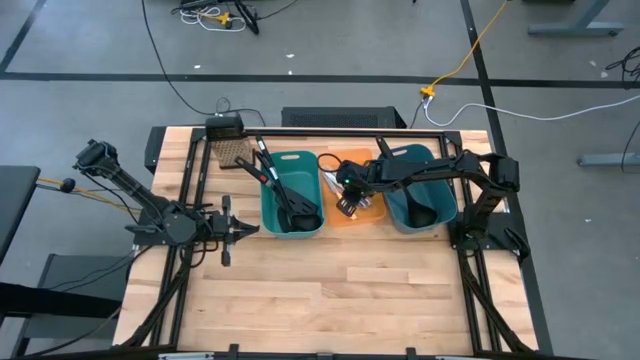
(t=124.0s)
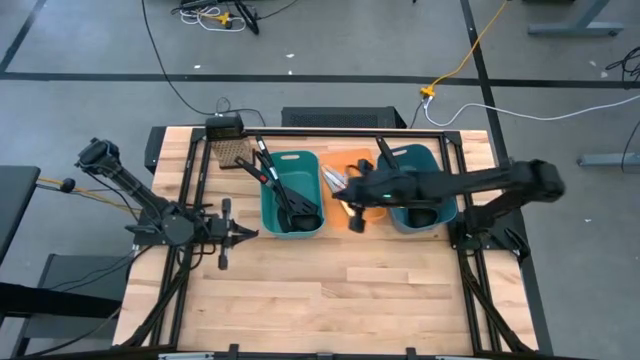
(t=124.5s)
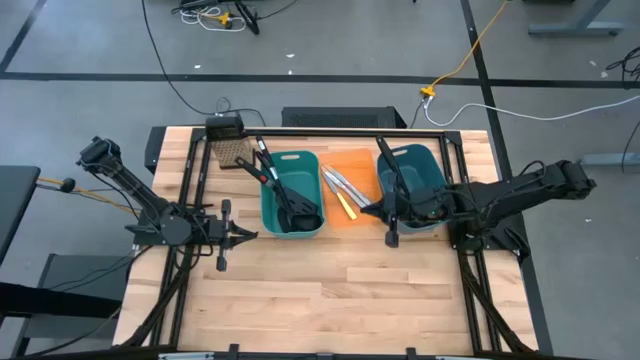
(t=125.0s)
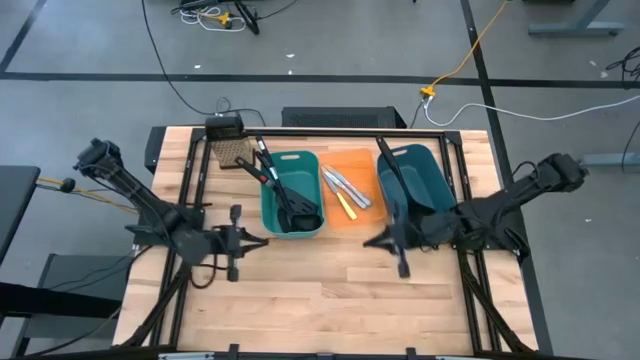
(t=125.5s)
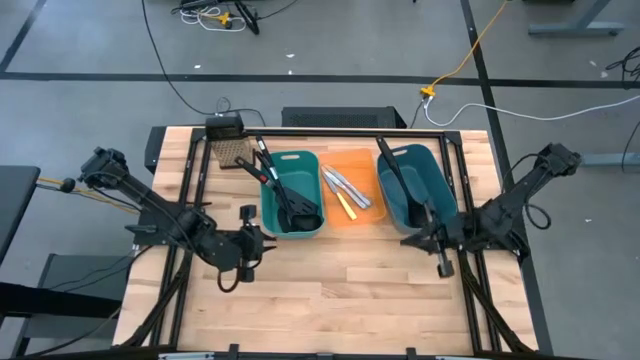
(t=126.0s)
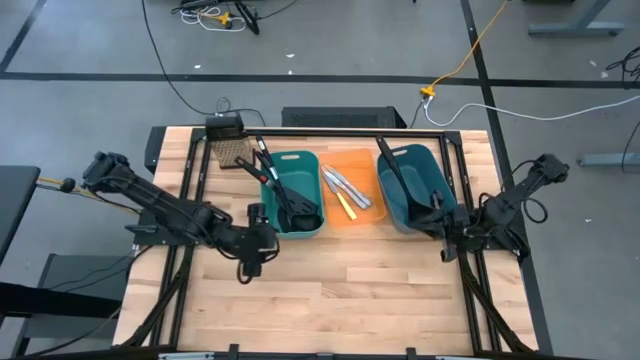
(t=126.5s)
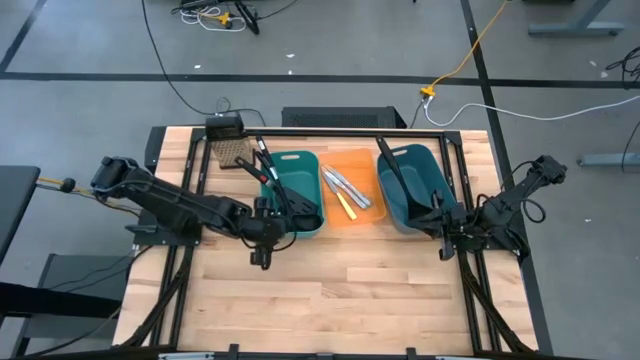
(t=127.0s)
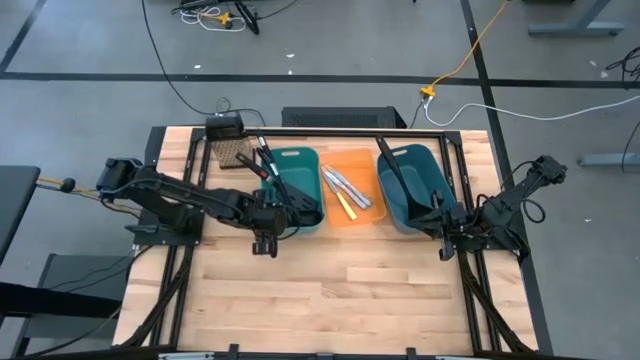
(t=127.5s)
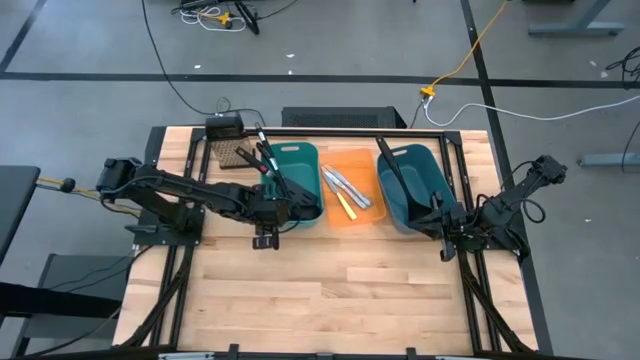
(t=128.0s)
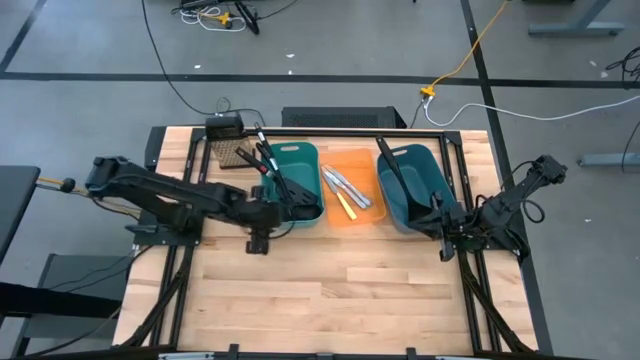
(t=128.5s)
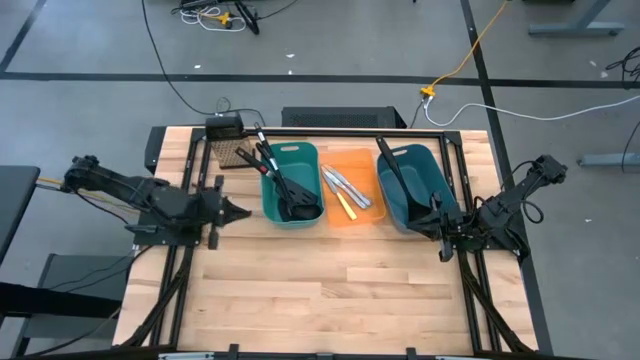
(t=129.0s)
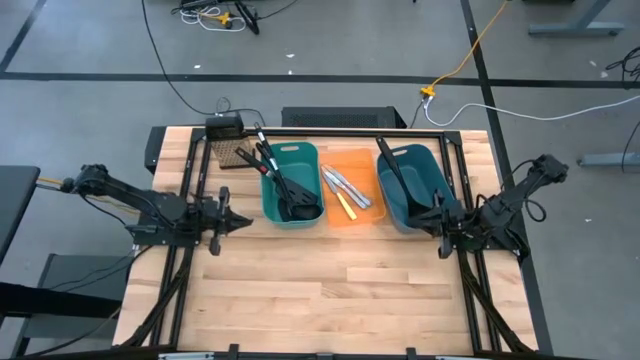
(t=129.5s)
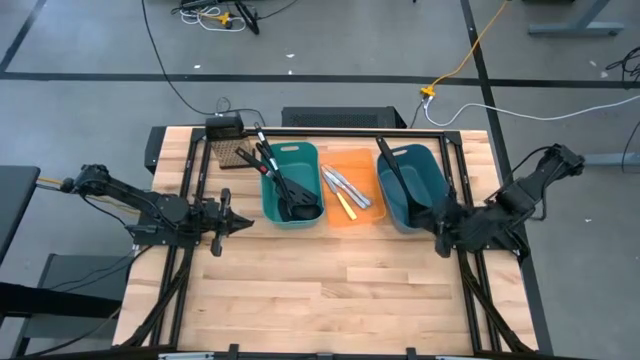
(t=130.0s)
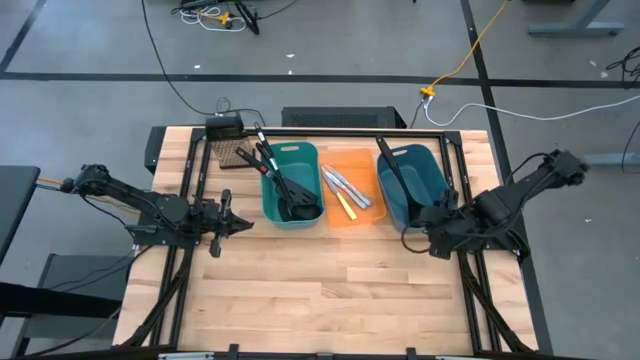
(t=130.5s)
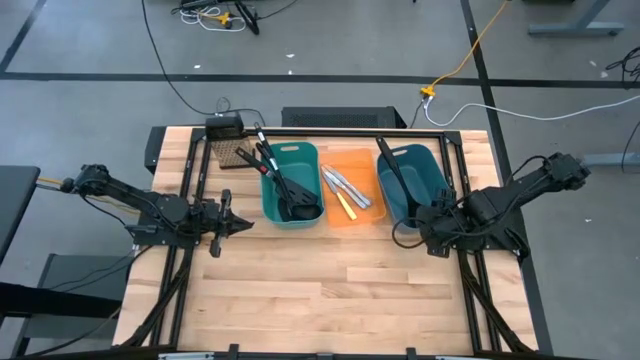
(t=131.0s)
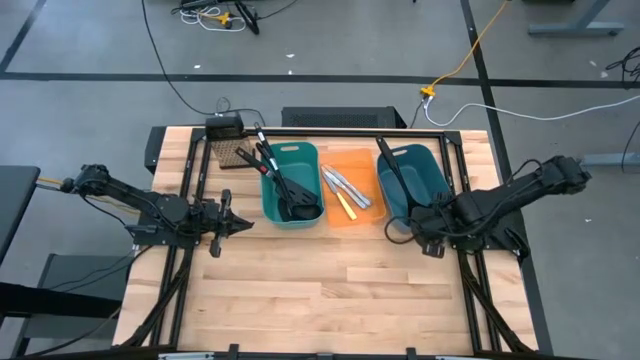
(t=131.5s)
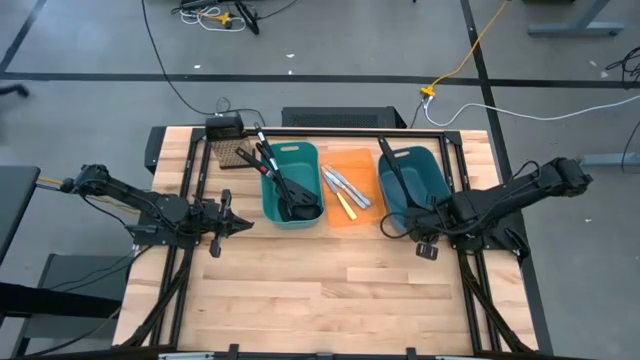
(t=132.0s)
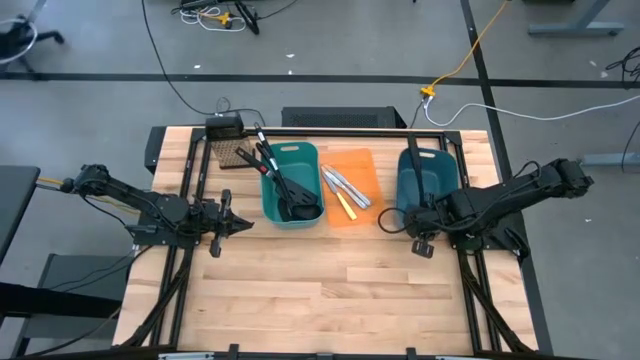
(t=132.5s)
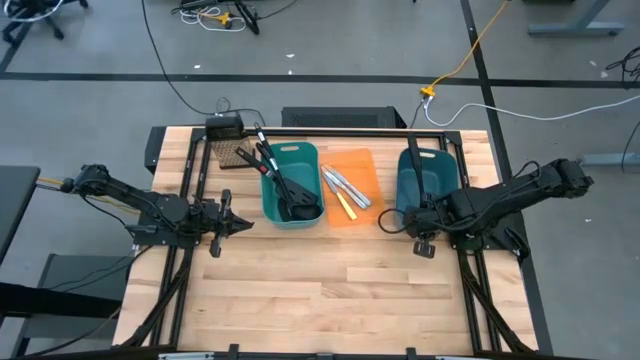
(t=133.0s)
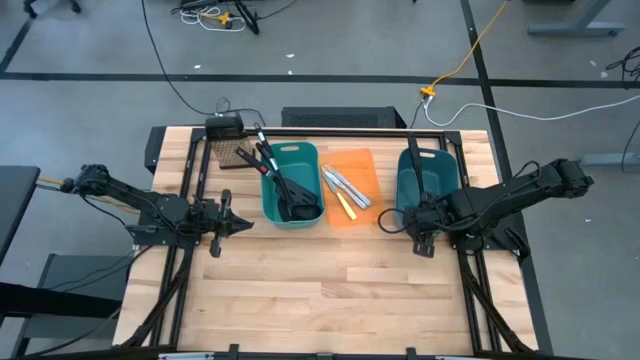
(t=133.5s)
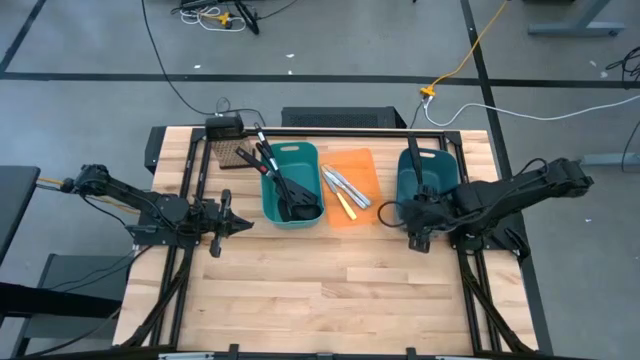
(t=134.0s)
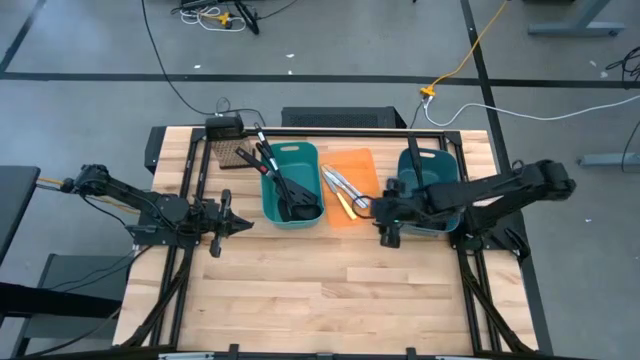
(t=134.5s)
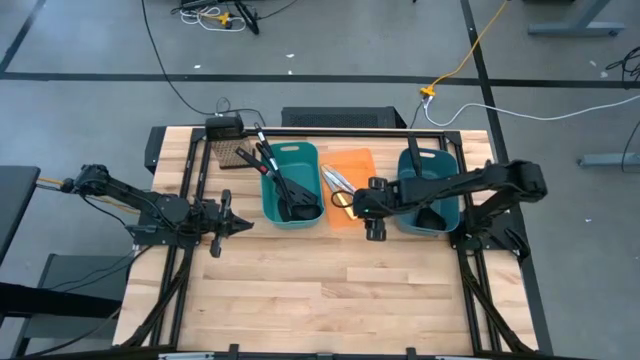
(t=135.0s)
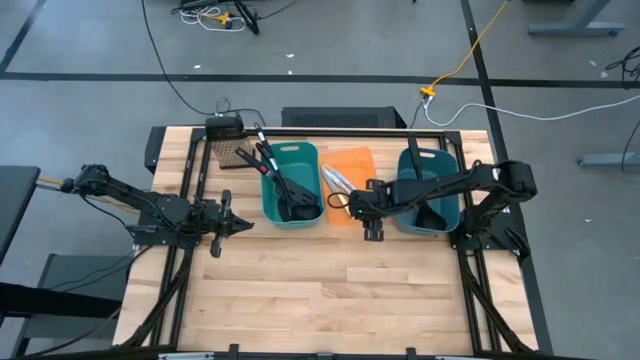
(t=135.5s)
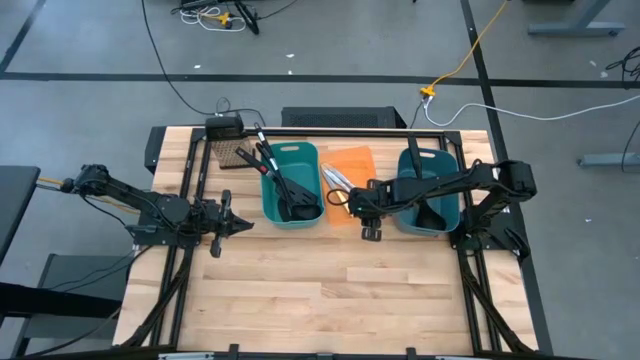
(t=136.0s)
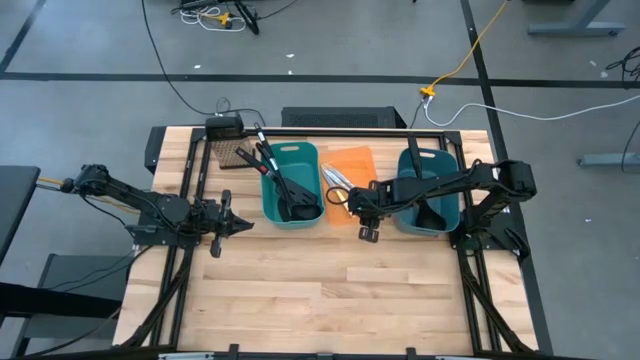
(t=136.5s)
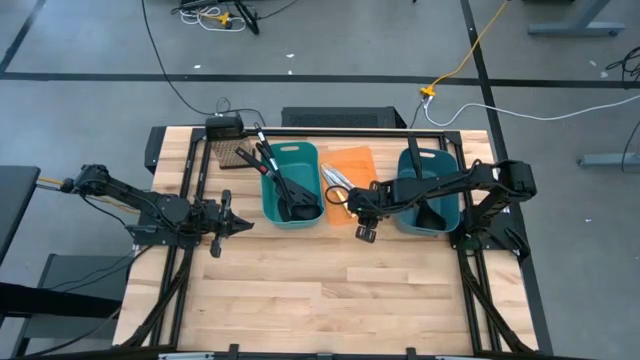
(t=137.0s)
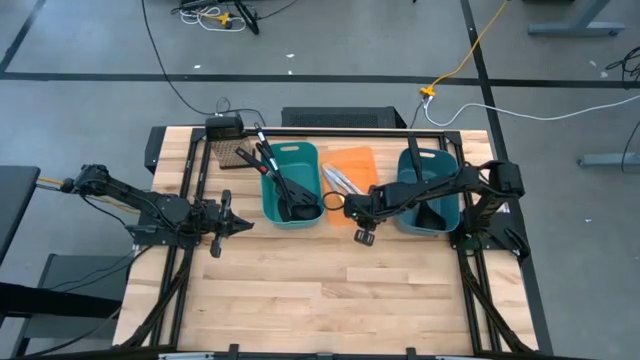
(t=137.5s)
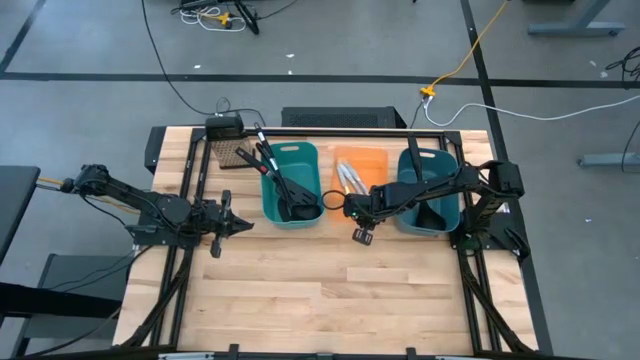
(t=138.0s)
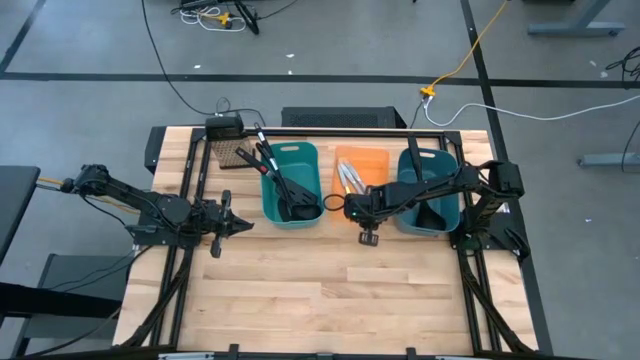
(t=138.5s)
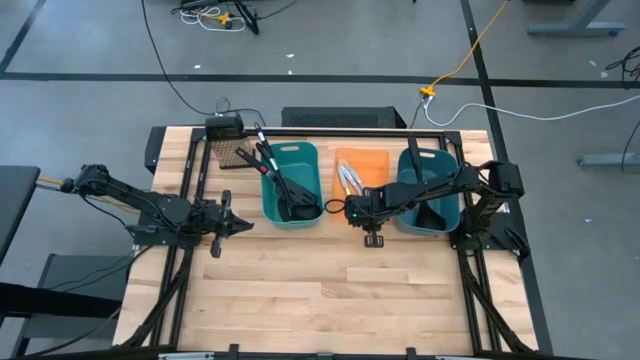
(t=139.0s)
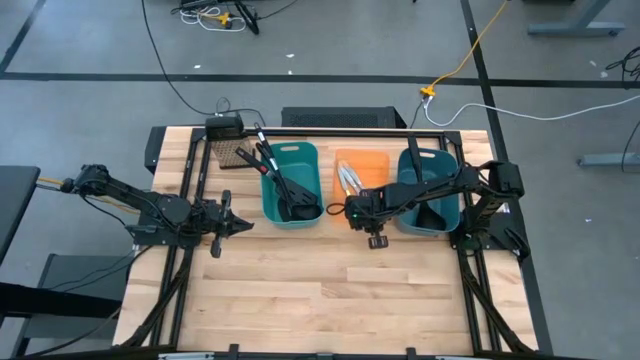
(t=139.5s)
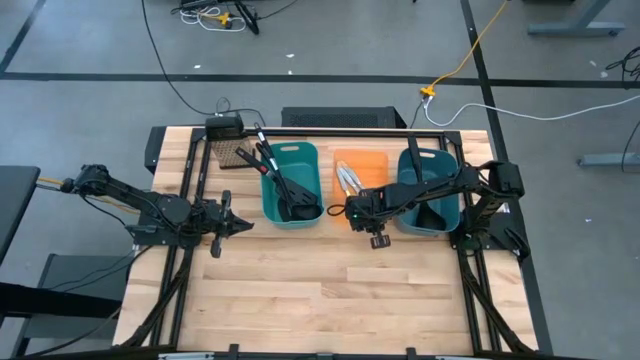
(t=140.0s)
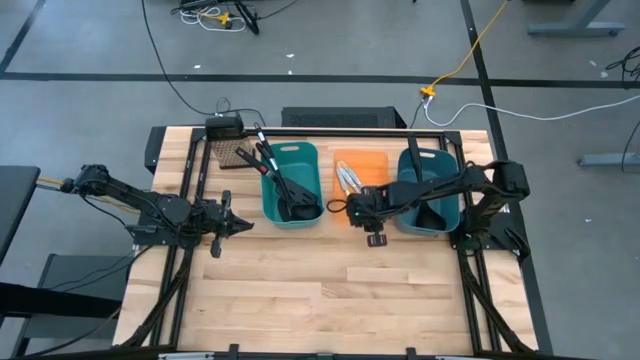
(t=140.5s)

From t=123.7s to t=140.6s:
Task: Pick & Place Kitchen Items
Adjust the bins on the table

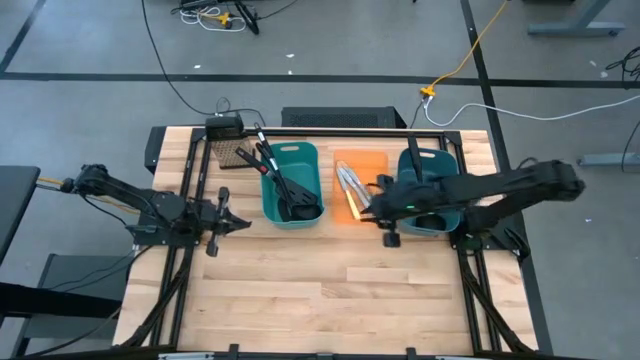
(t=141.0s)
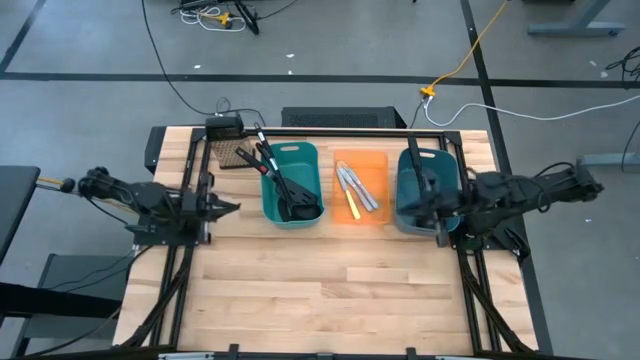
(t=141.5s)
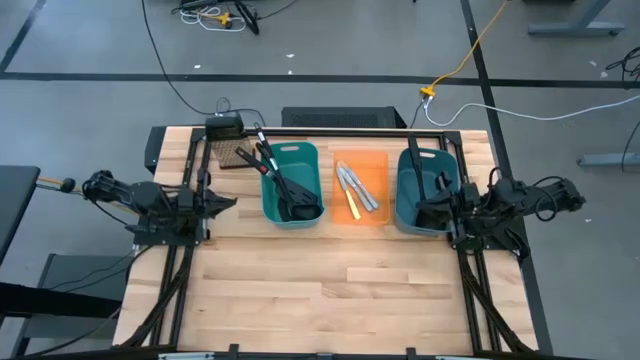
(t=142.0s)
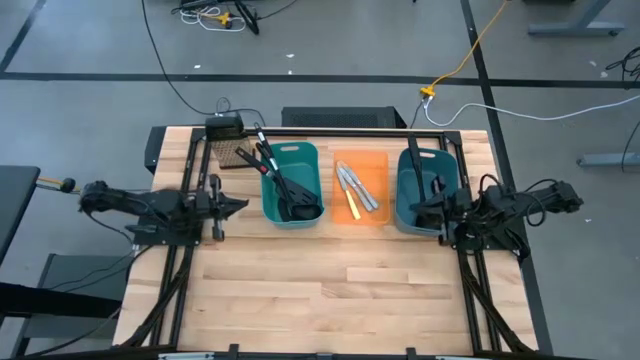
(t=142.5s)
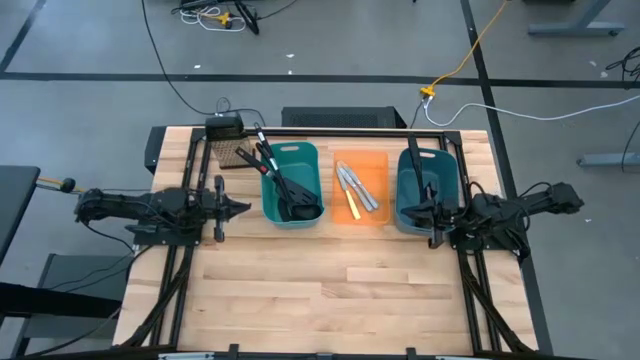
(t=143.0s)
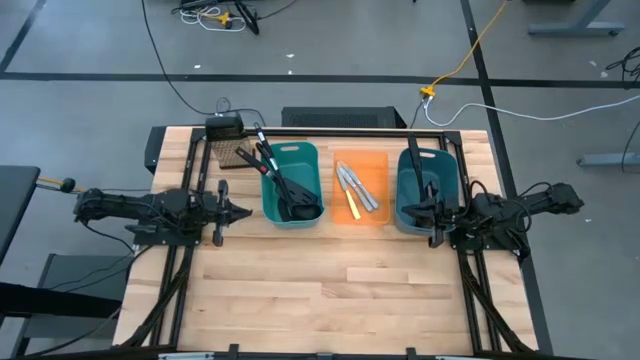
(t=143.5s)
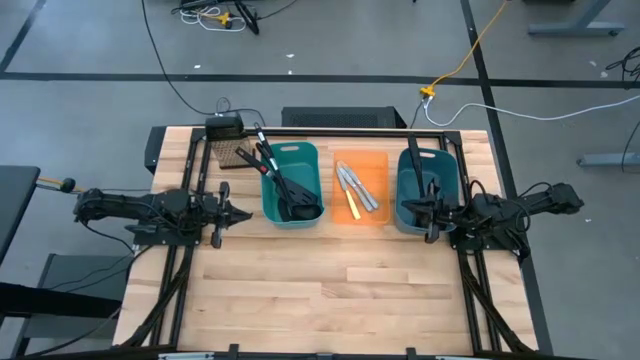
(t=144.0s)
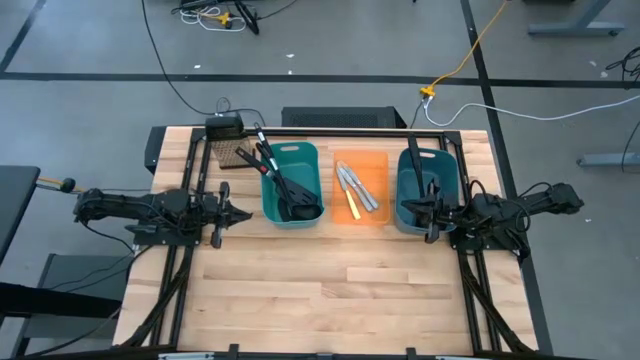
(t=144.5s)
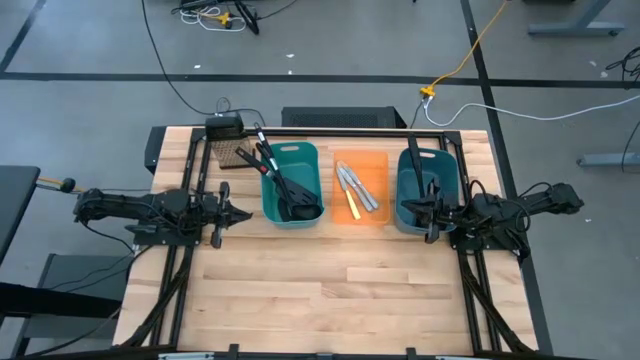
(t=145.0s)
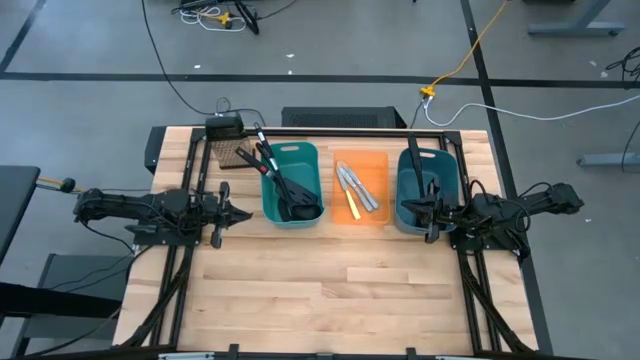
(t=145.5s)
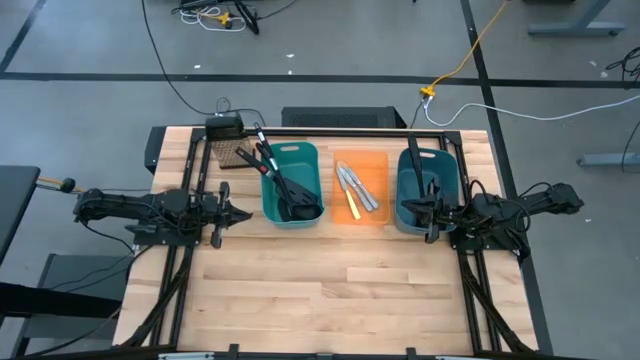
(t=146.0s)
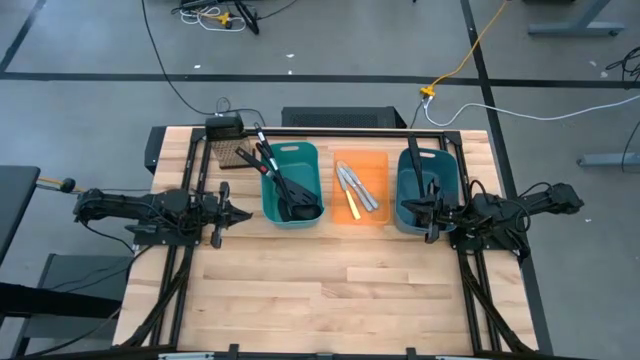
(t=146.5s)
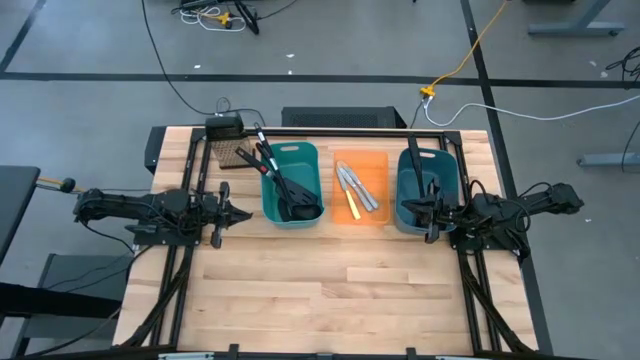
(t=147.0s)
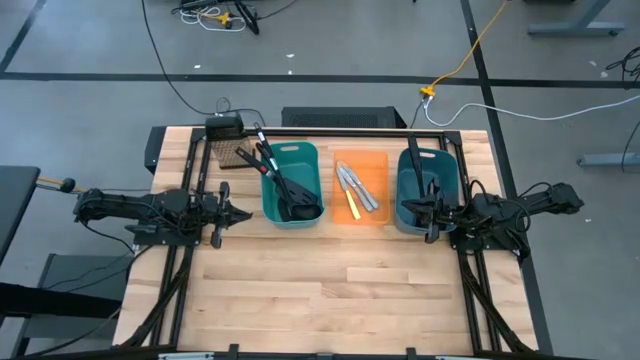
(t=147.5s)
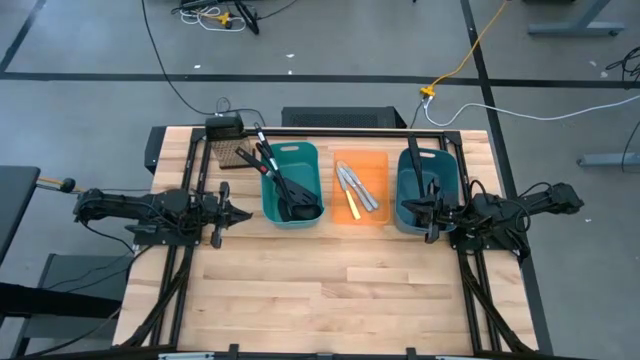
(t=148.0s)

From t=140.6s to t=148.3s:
Return to Home Position
